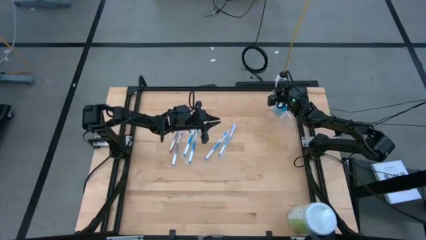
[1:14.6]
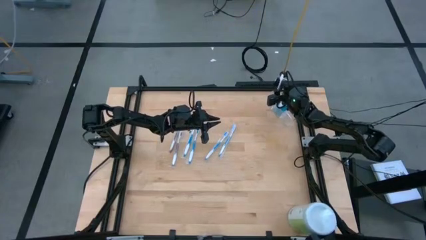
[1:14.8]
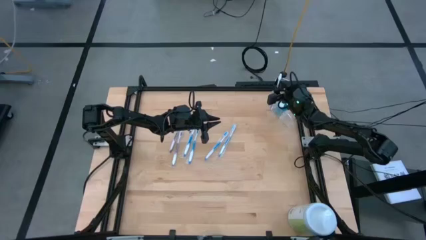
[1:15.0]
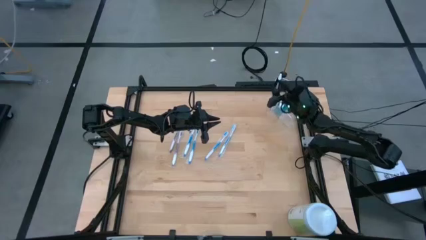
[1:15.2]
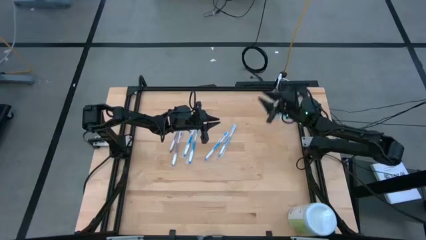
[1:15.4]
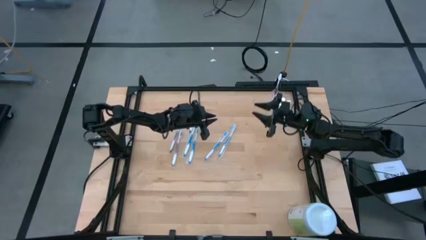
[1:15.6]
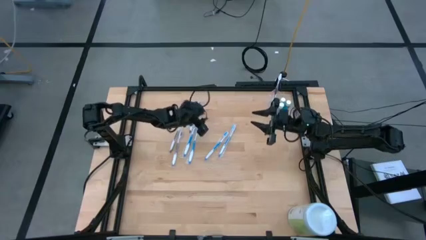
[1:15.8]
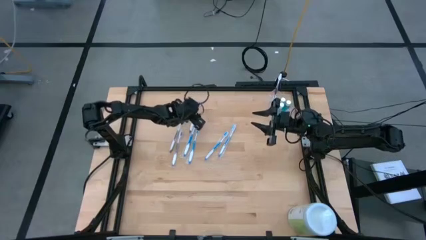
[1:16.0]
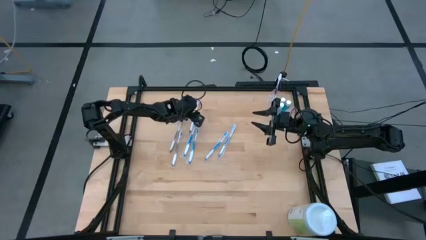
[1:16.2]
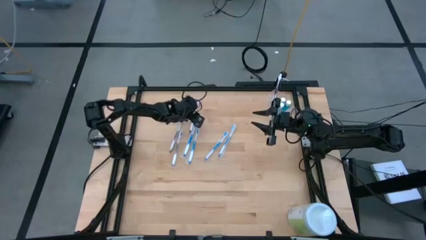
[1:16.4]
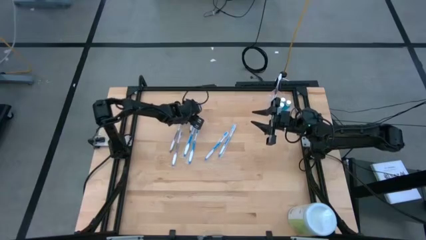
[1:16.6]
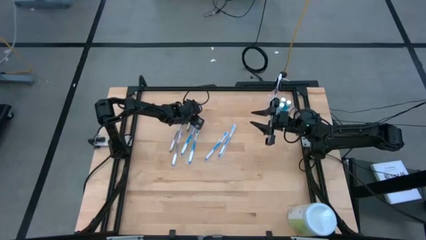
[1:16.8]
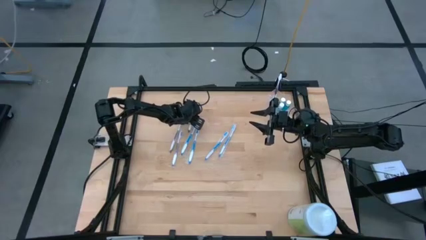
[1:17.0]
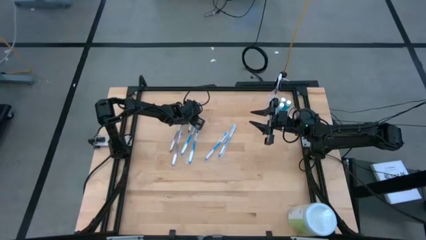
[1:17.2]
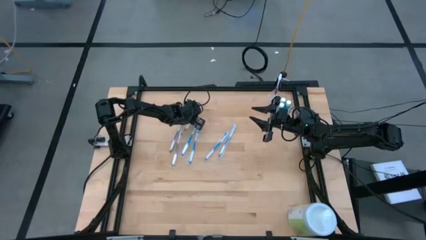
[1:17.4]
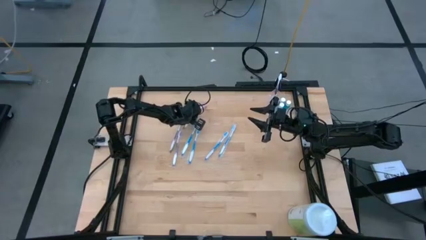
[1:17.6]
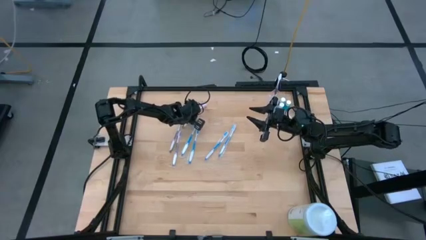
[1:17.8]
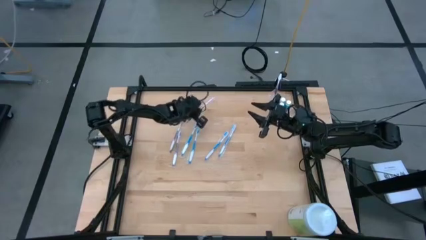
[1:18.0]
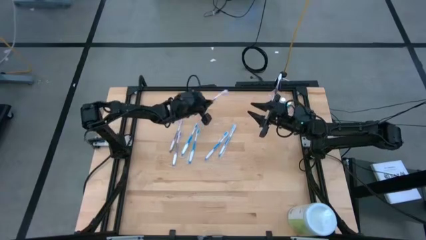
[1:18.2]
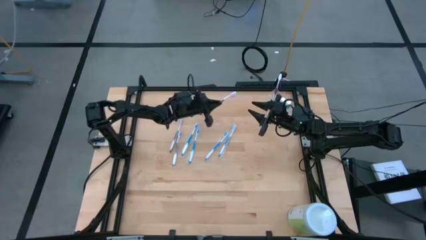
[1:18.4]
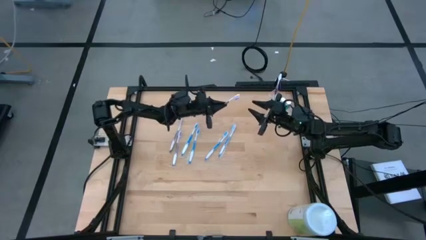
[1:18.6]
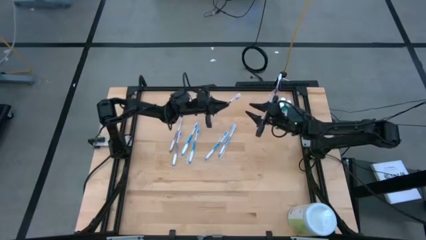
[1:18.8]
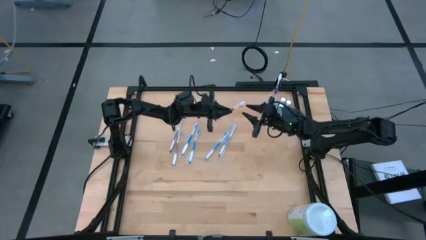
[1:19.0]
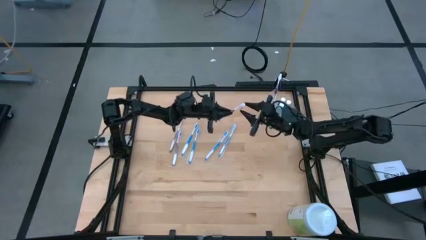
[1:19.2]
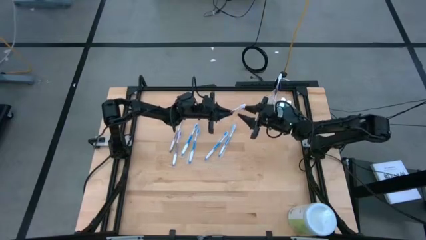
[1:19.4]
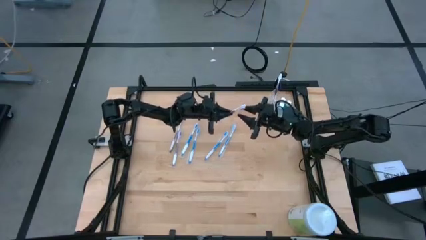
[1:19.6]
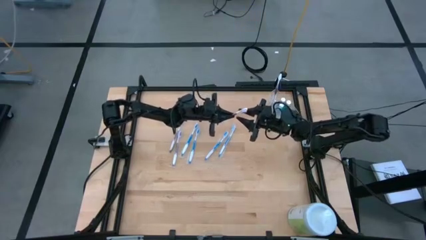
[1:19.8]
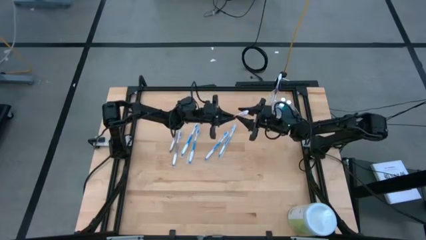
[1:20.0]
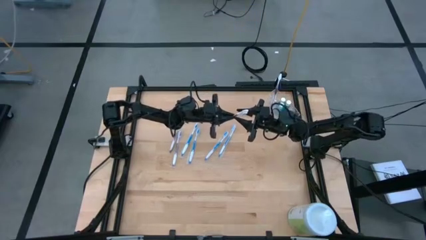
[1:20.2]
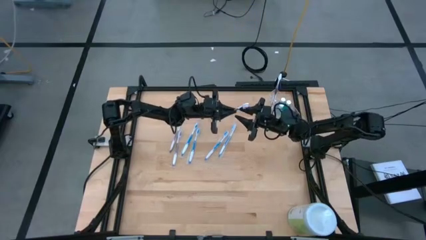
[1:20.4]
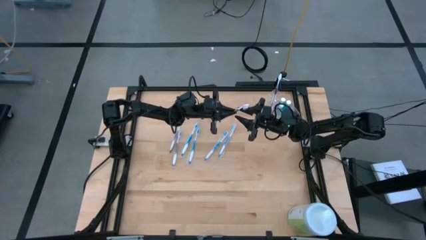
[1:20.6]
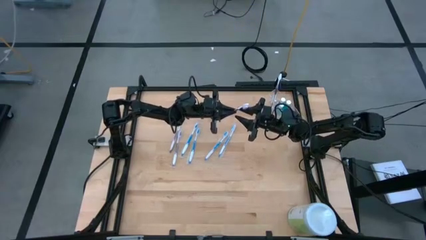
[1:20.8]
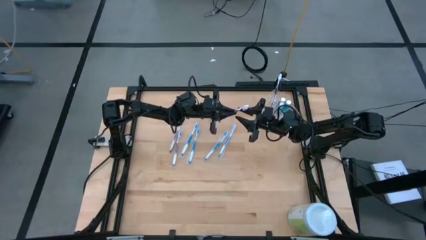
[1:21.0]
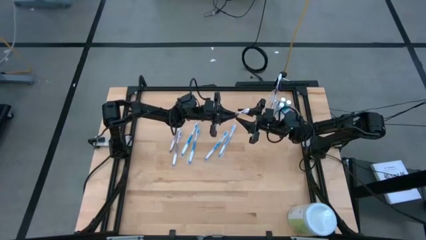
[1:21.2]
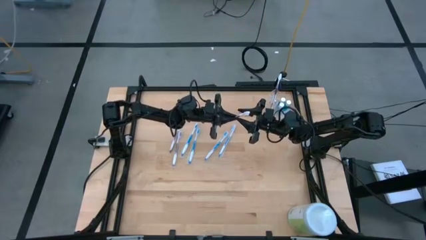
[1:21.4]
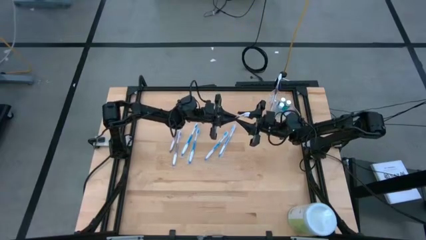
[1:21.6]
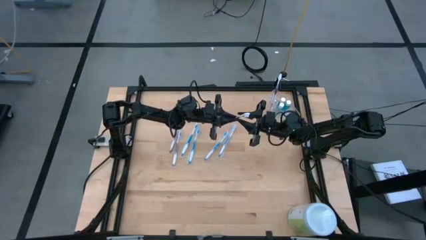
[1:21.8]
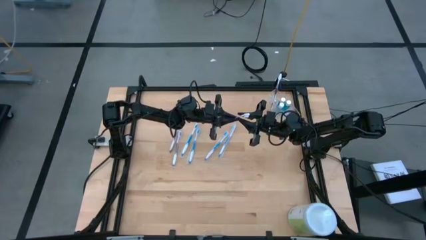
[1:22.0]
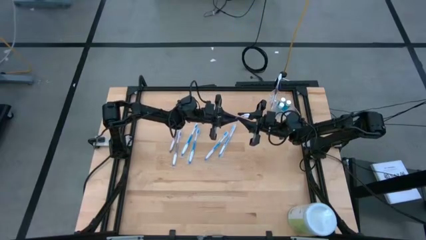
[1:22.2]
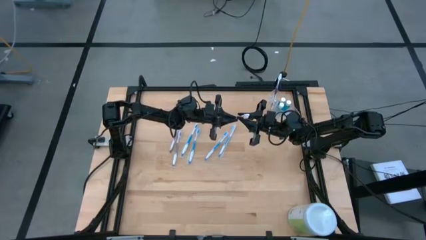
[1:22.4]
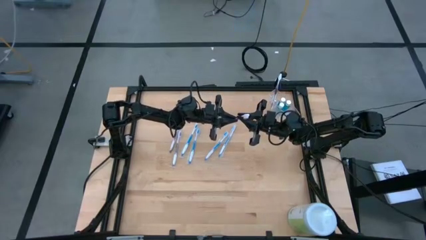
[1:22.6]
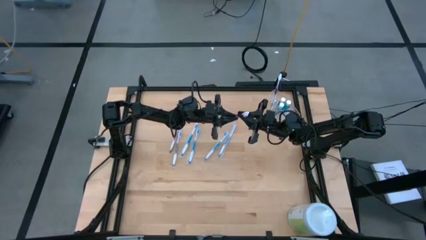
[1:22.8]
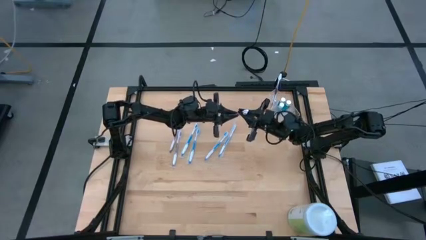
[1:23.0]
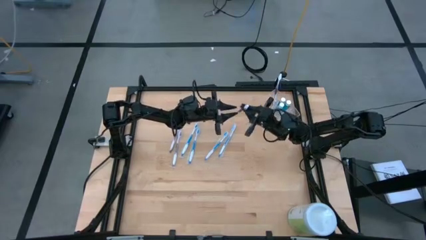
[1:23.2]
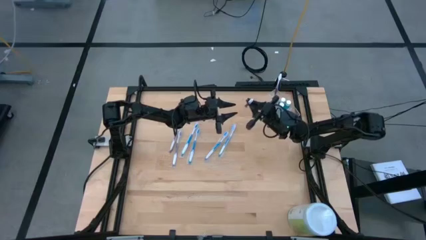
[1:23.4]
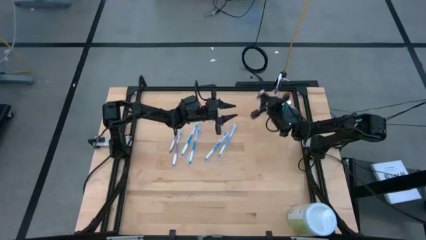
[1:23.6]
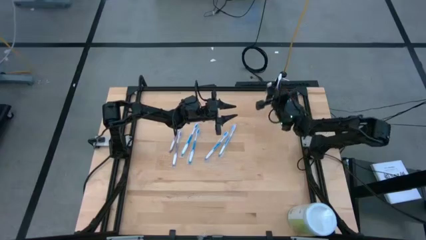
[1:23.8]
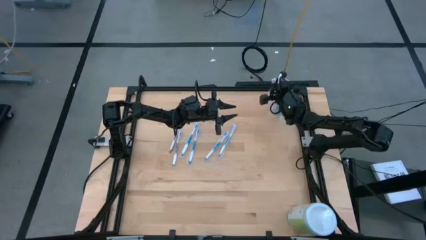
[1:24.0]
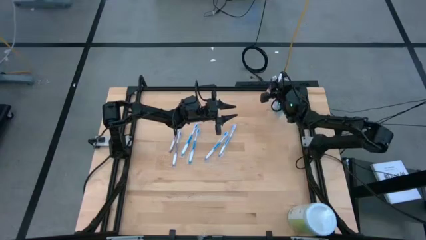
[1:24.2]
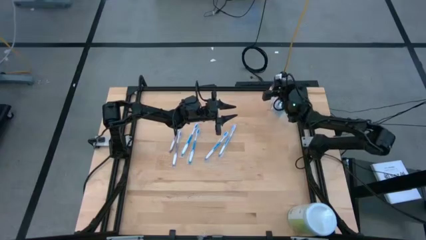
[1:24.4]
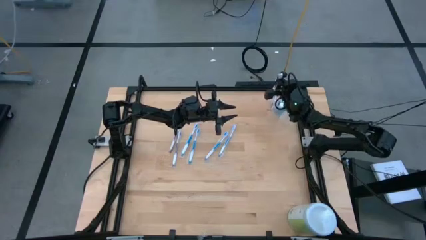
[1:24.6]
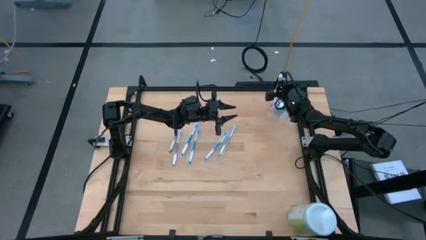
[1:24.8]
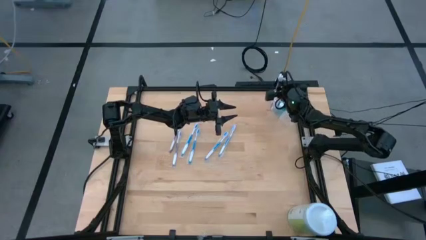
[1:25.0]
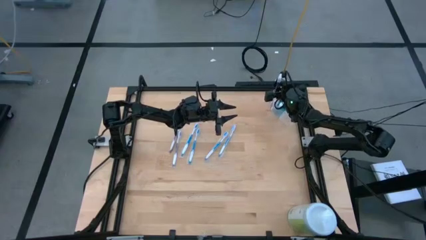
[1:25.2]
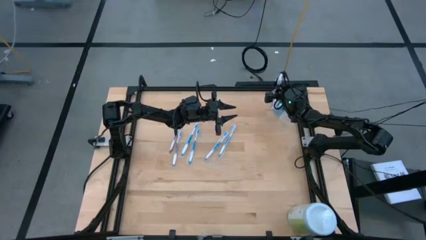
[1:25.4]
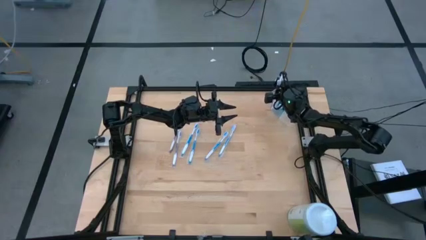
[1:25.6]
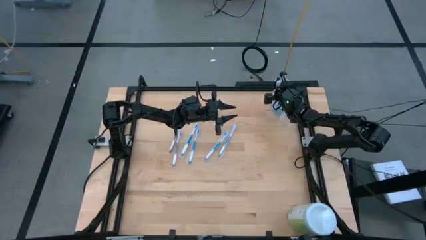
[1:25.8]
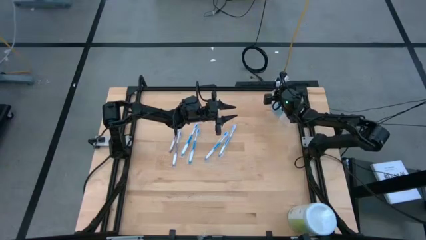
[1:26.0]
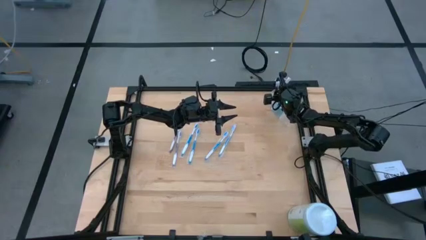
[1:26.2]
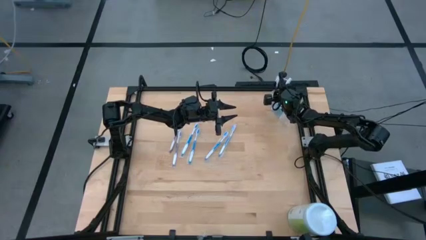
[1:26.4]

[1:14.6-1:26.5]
Task: Pick & Place toothbrushing station
Put the violet toothbrush into the left of the transparent organizer
